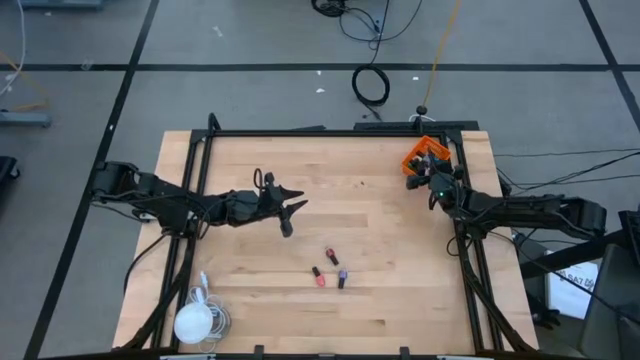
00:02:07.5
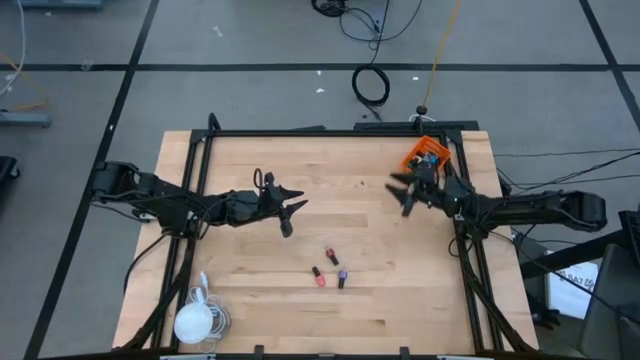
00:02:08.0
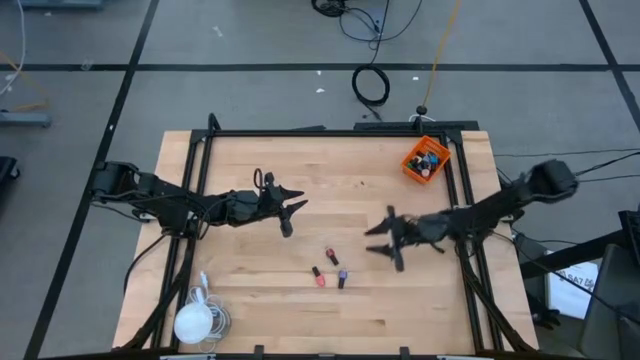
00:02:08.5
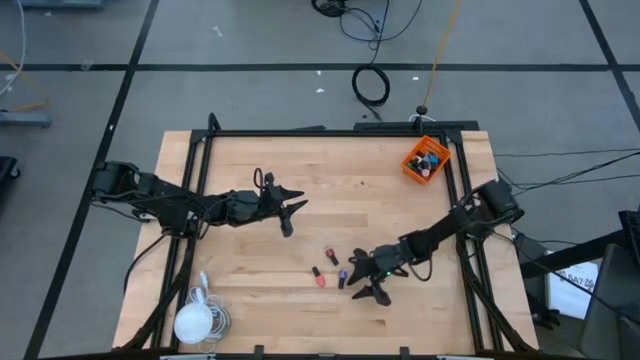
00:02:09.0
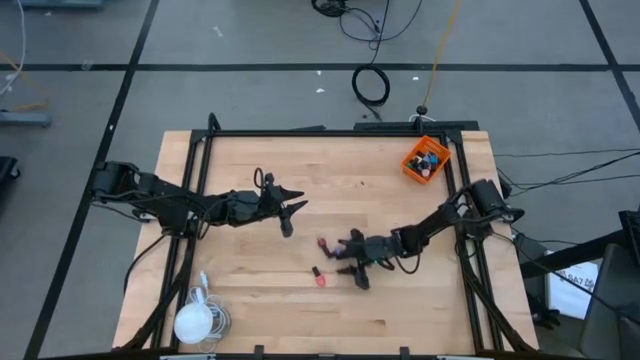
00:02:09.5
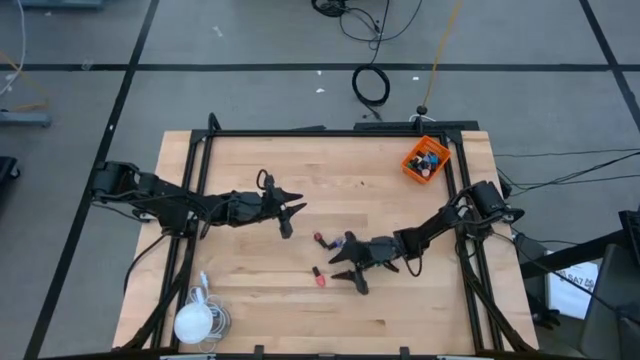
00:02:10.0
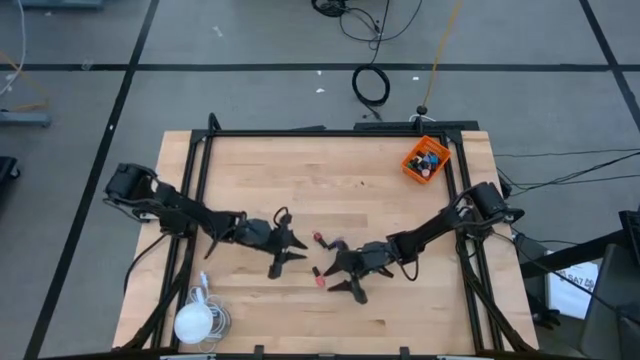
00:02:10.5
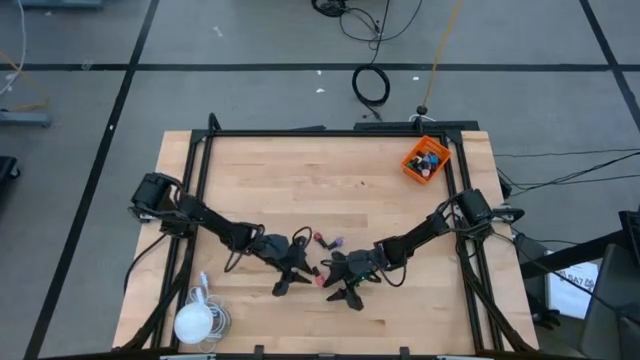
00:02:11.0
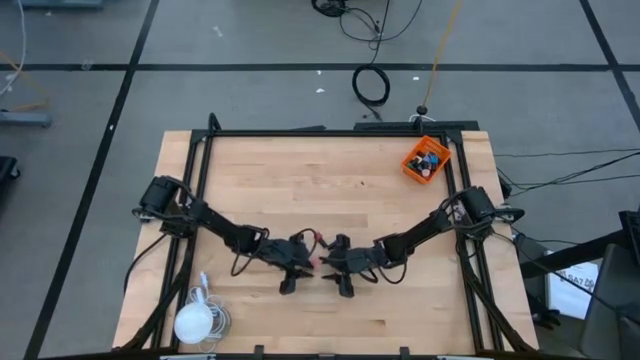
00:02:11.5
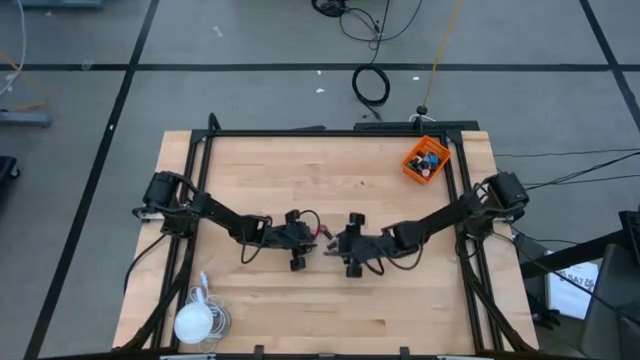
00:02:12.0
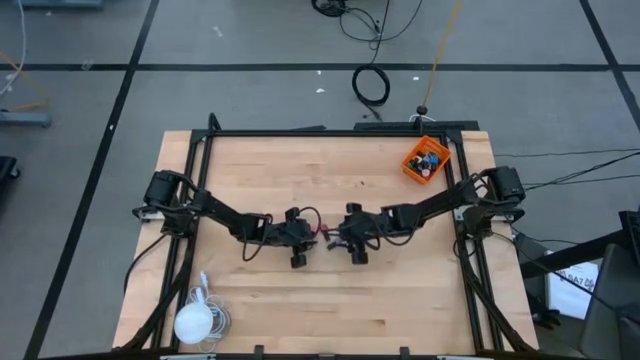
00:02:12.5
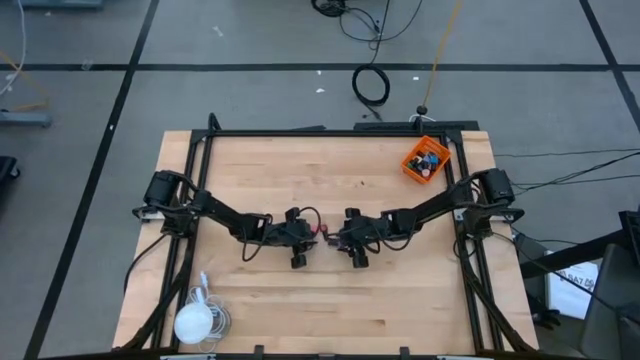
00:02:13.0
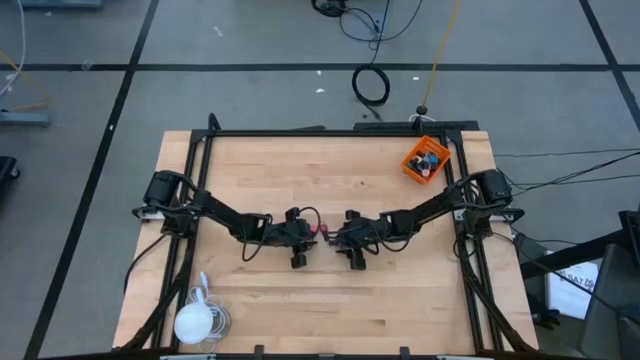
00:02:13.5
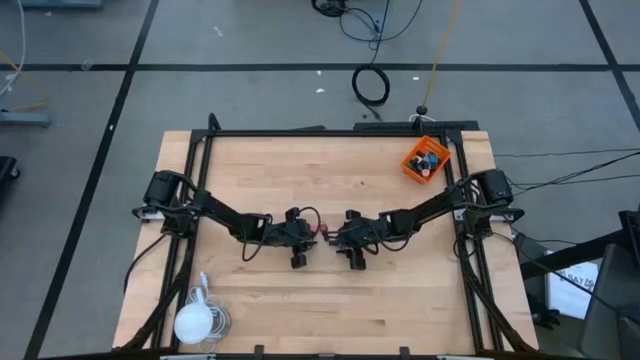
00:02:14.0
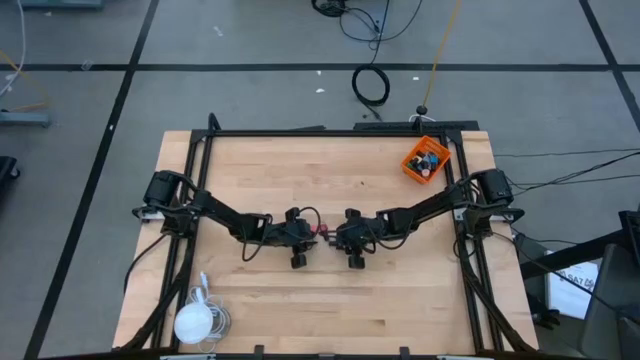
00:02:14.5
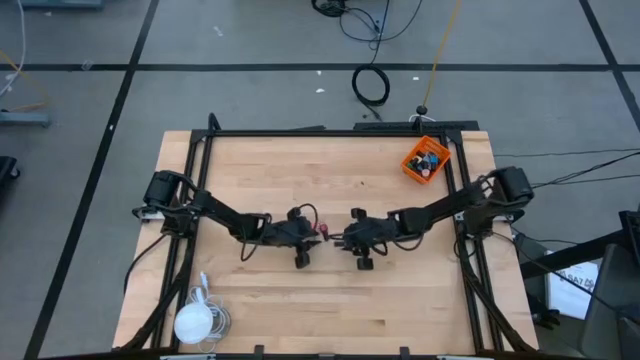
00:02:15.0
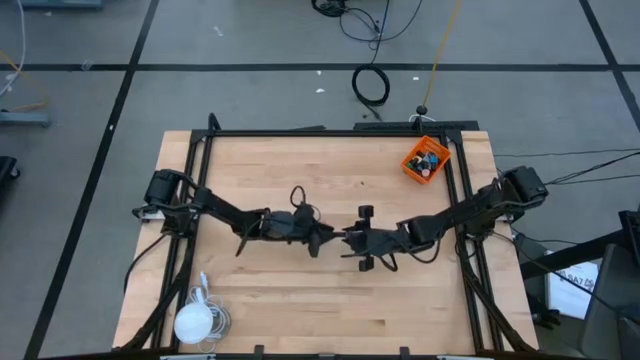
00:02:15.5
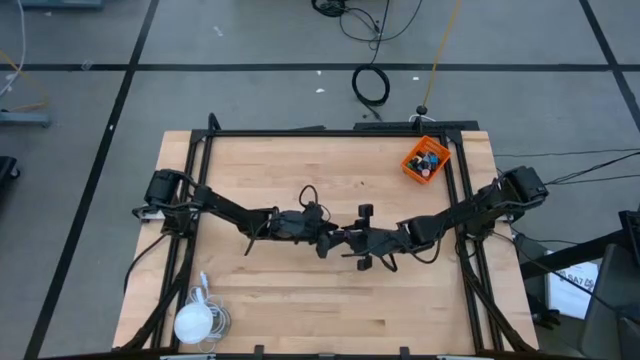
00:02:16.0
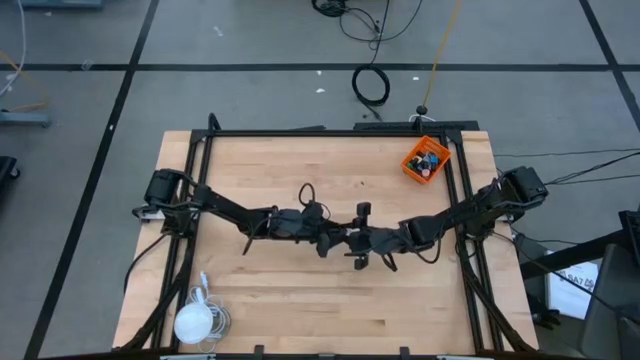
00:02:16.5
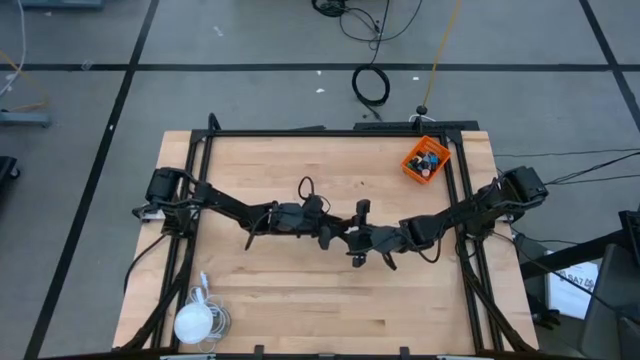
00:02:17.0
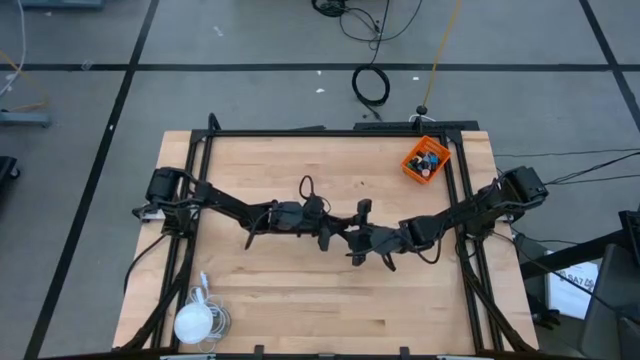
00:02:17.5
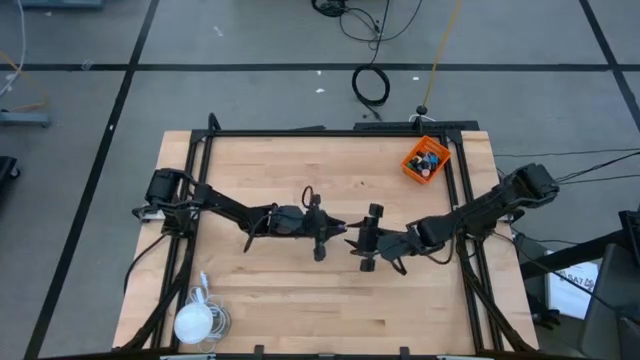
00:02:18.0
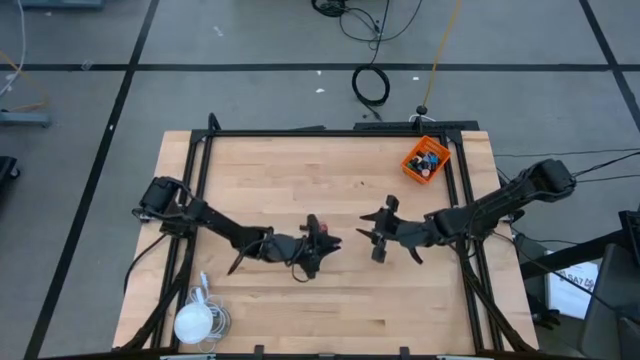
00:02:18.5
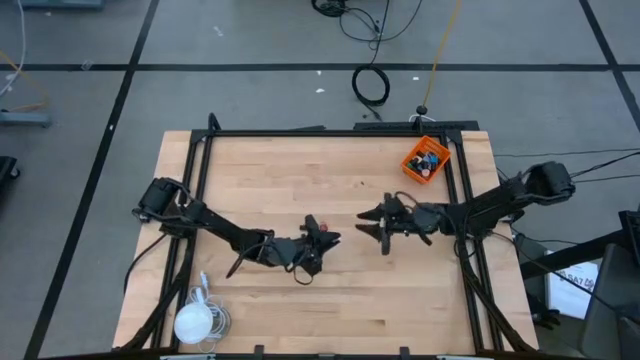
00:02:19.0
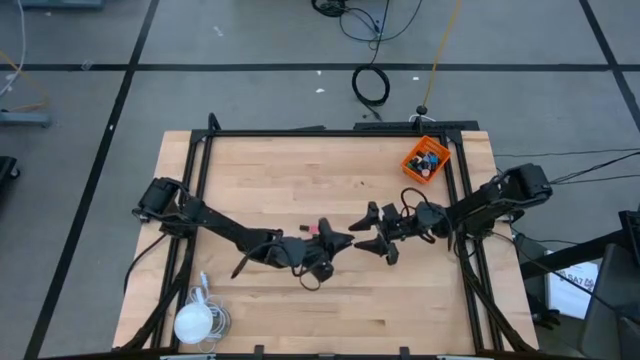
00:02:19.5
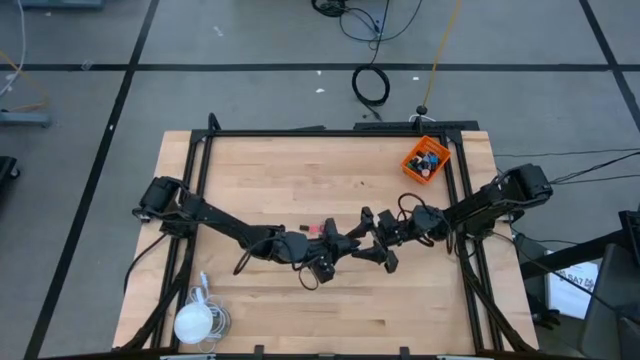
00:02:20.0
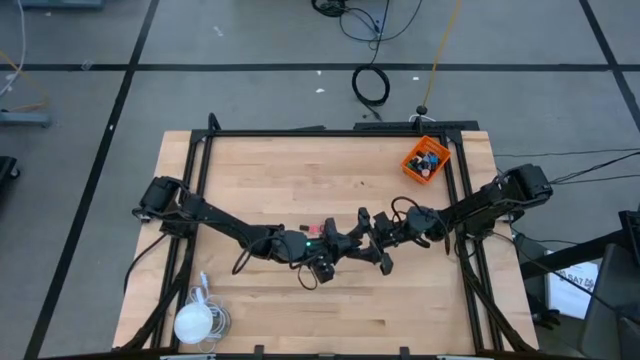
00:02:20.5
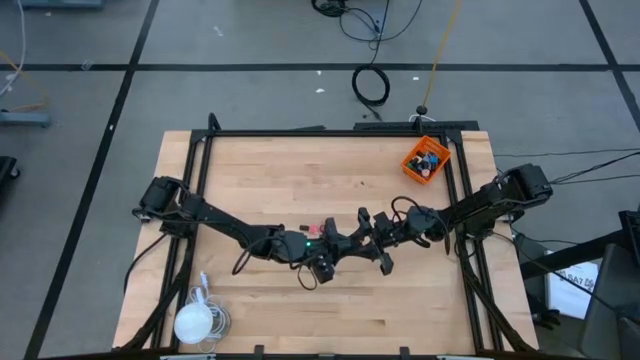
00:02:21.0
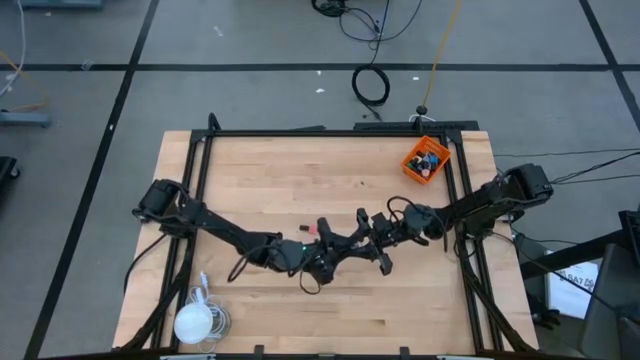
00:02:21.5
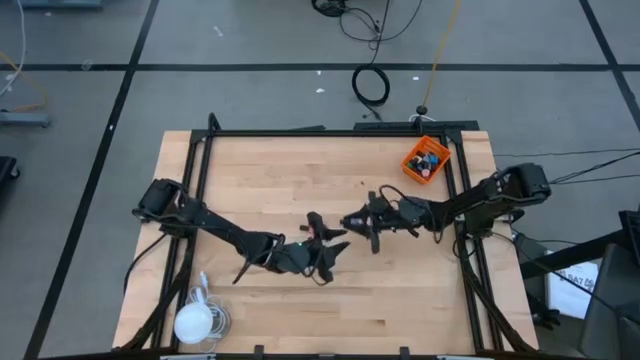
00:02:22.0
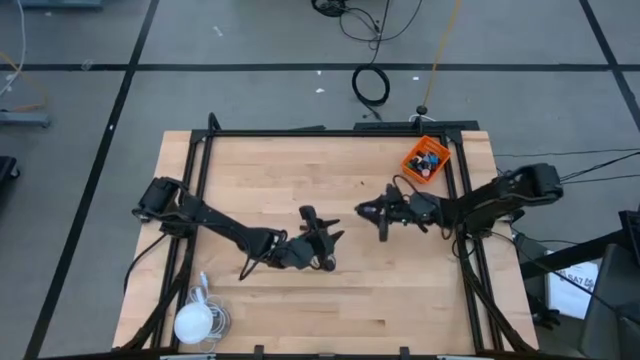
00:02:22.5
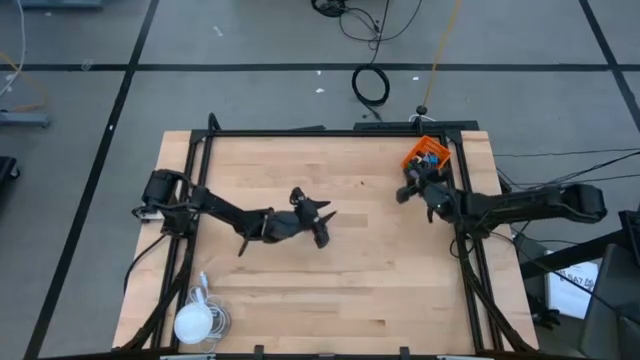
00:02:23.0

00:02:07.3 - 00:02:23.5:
Task: Pick & Place Nail Polish
Put the light purple nail polish bottle into the orange basket

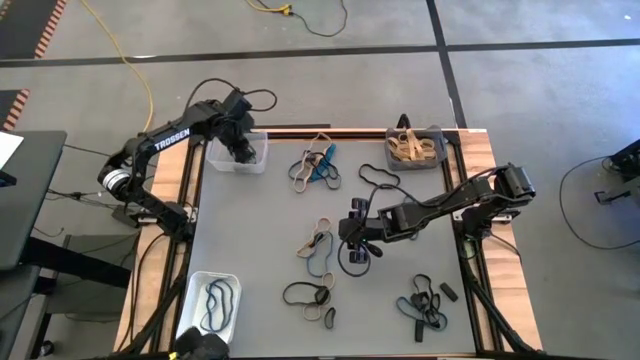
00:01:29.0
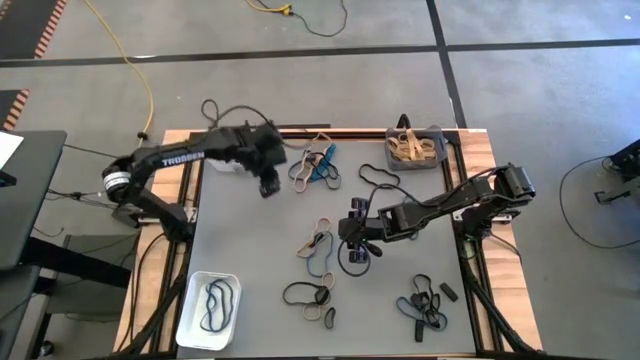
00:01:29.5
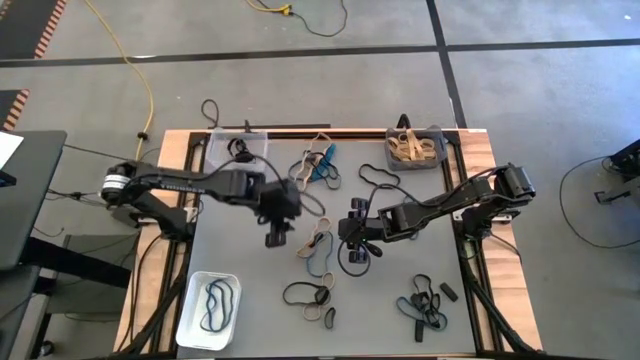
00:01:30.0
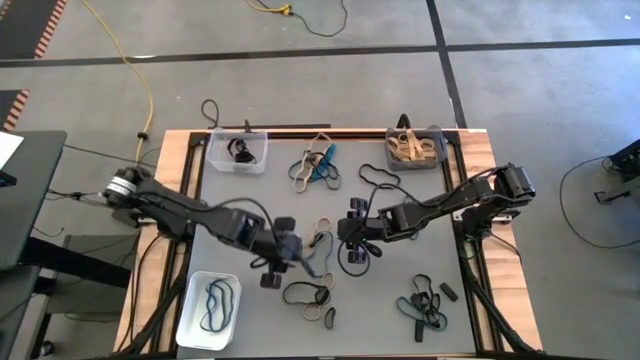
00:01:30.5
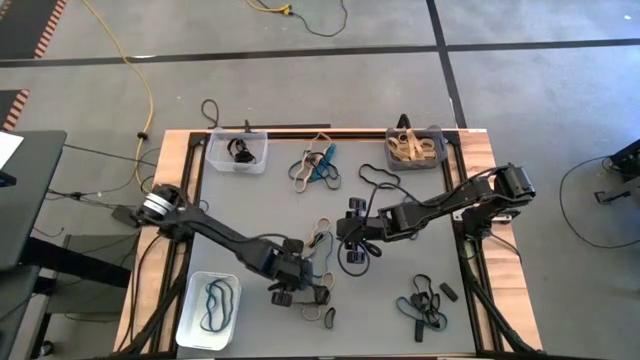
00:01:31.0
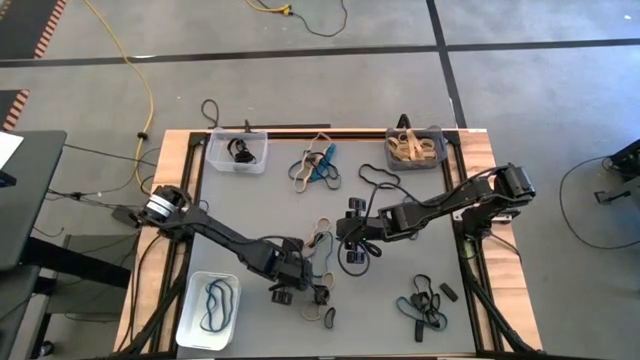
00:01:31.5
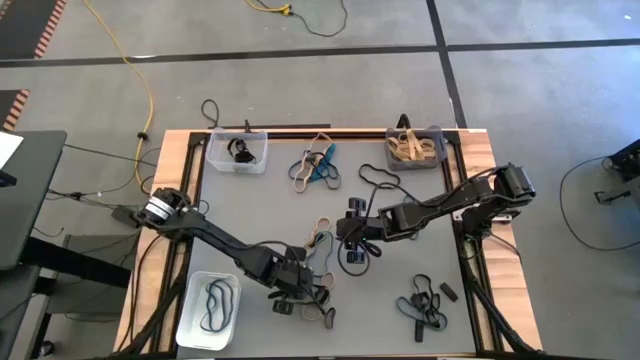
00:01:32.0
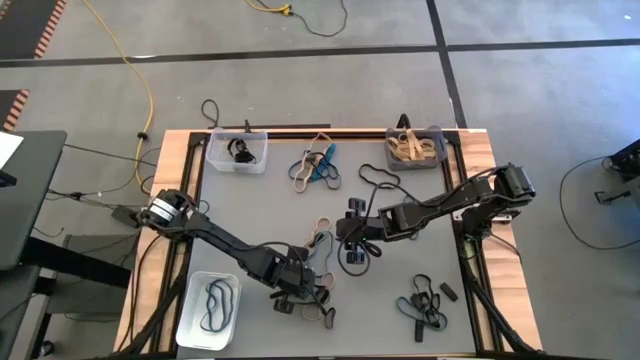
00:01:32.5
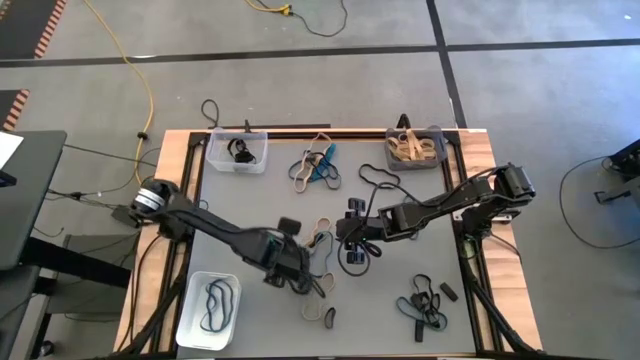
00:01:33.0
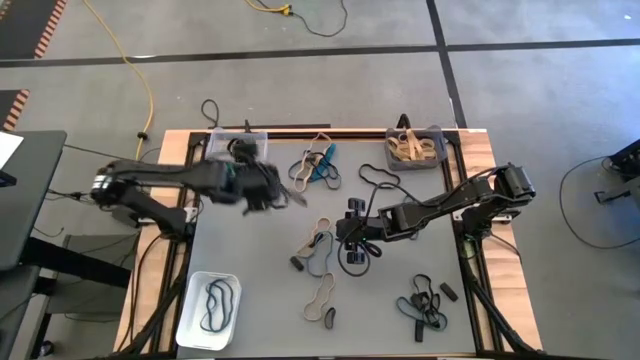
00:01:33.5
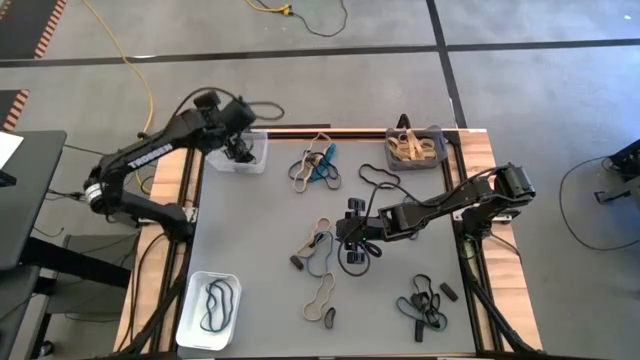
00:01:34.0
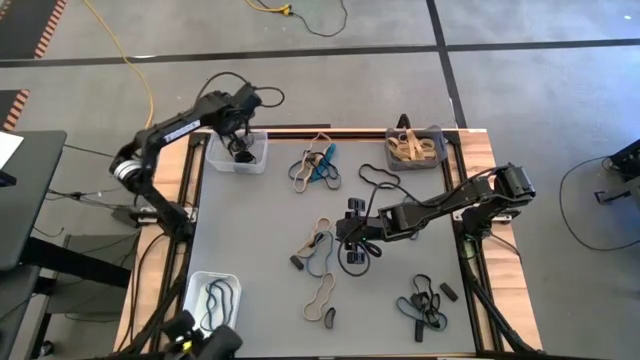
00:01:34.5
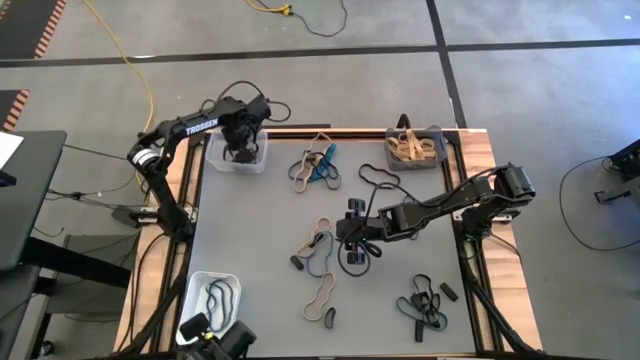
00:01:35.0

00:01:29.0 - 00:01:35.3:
Task: Sort rubber bands into baskets
Put the black rubber band into the transparent bin
